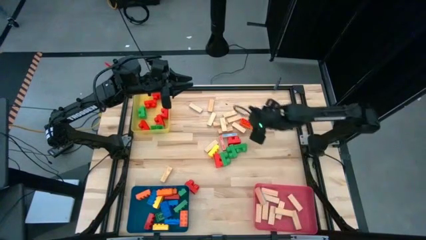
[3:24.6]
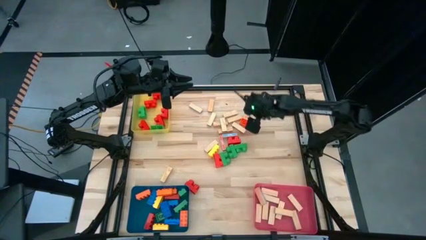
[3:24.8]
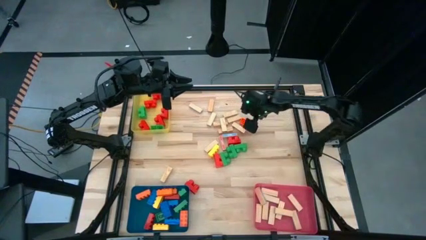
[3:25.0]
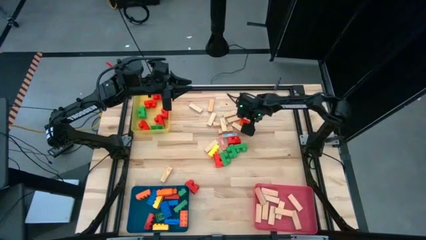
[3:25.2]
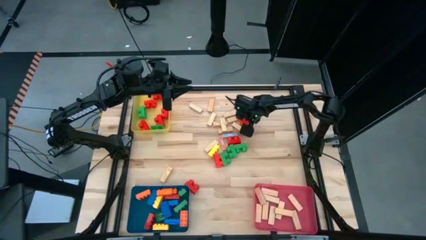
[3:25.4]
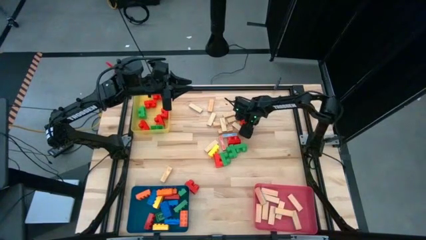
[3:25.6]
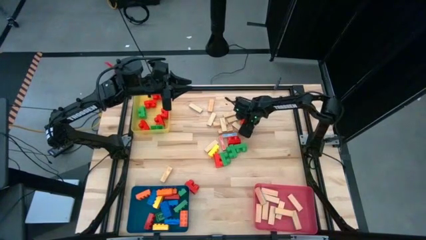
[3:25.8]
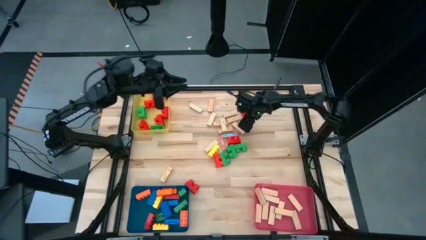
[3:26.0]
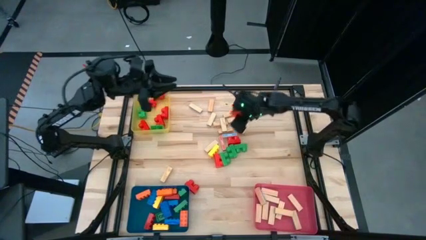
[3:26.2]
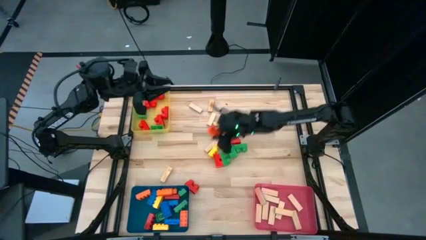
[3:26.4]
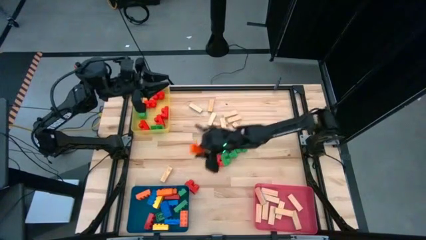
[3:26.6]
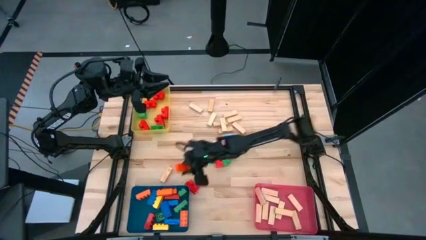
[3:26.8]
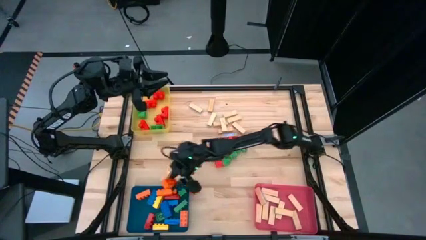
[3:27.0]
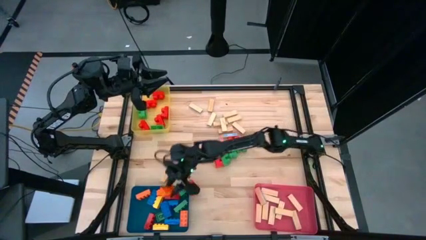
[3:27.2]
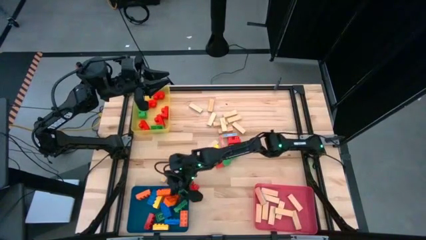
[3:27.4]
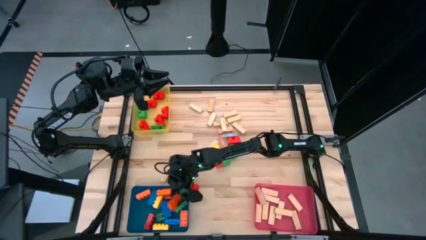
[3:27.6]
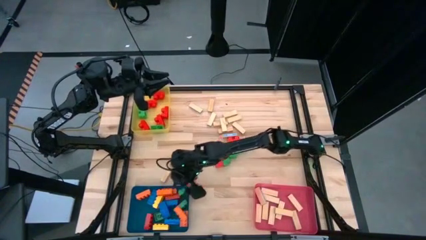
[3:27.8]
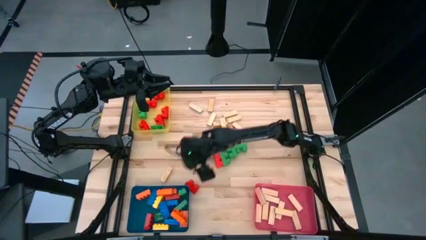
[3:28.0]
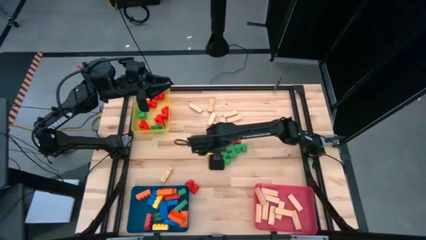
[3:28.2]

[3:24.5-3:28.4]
Task: Sort blocks by size
Put the orange rectangular game piece into the blue bin

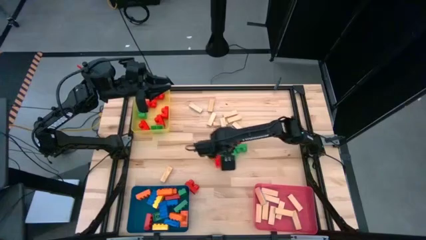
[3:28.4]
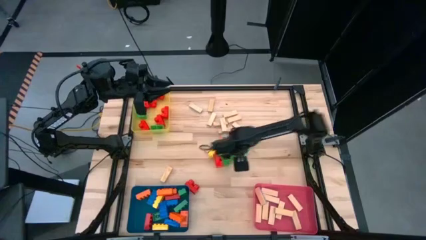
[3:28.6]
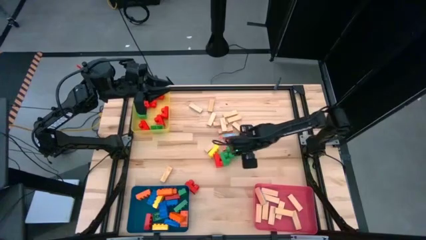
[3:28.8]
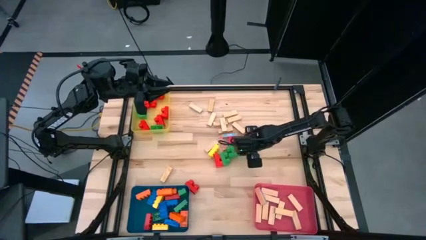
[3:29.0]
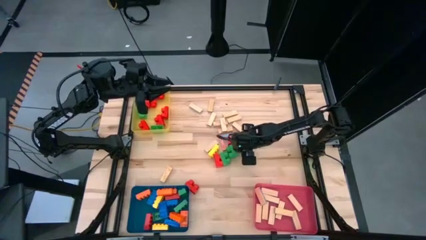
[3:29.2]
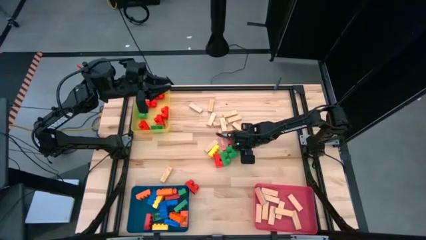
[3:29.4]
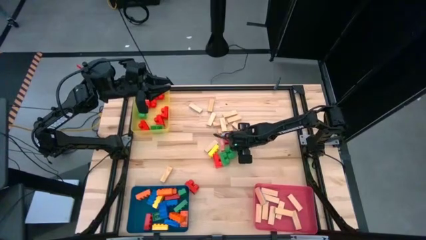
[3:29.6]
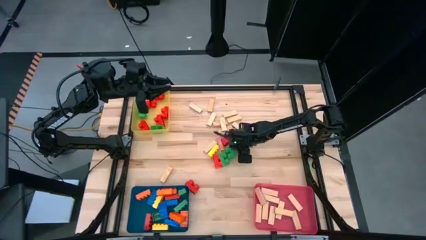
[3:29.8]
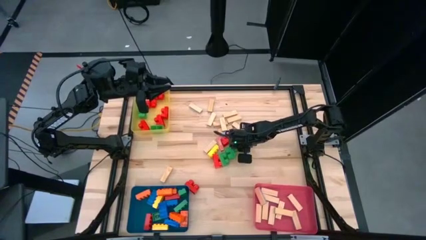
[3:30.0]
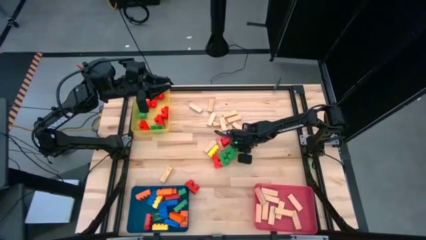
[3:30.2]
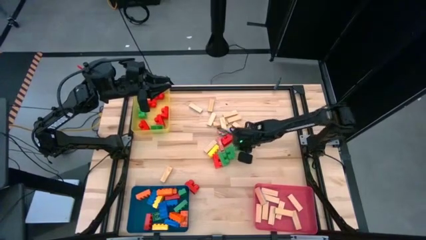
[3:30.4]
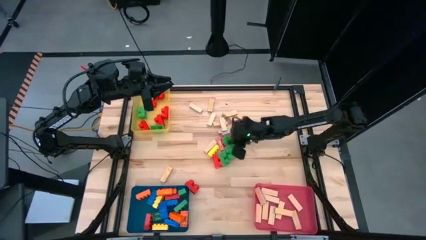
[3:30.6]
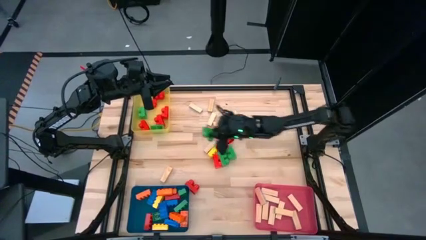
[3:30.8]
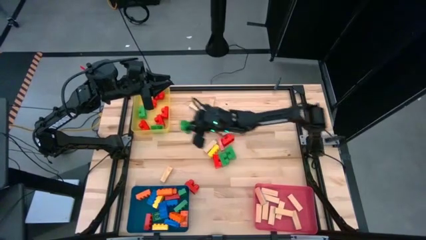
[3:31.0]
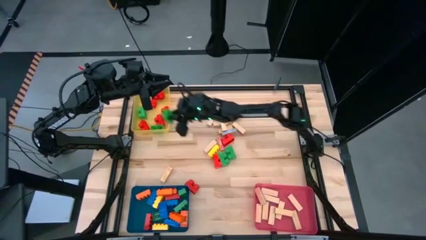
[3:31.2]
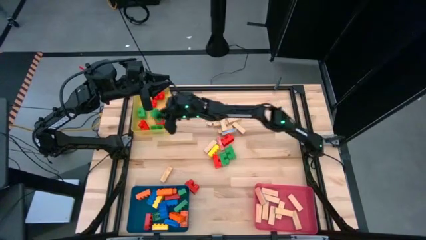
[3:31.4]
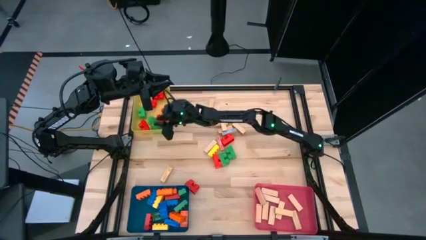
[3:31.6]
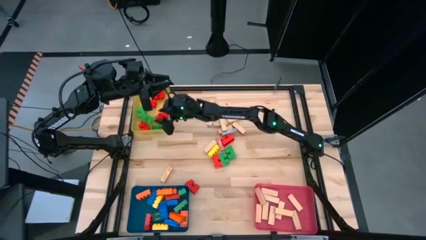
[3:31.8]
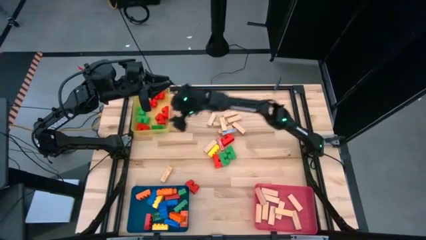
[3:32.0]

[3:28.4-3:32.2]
Put the round green game piece into the yellow bin

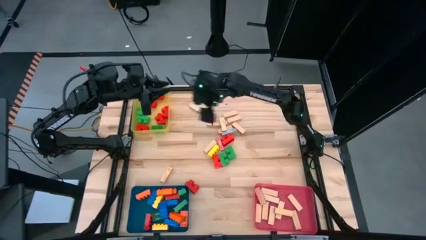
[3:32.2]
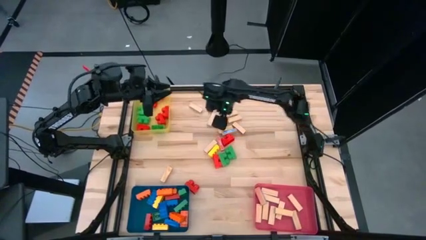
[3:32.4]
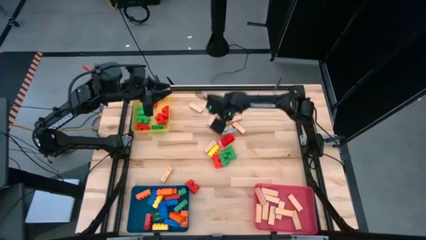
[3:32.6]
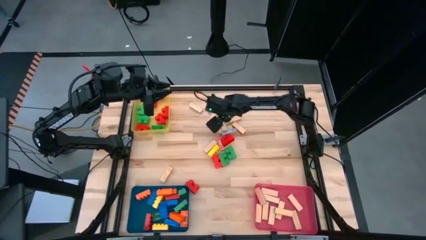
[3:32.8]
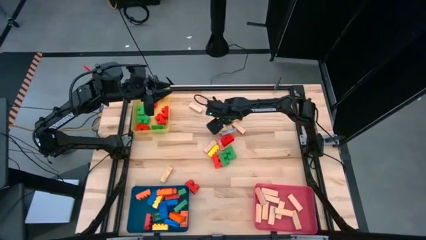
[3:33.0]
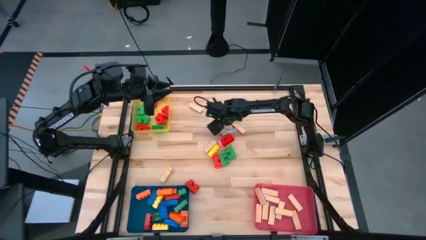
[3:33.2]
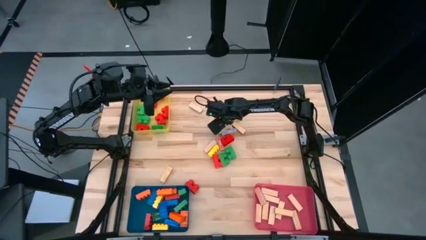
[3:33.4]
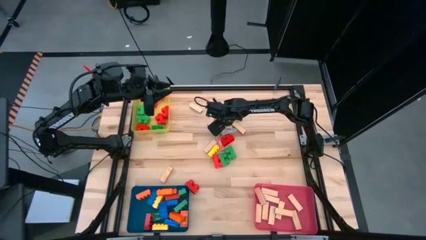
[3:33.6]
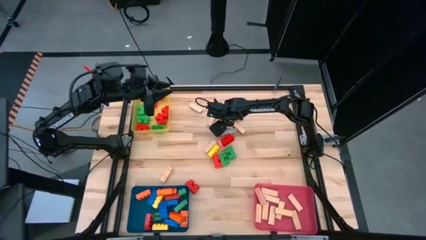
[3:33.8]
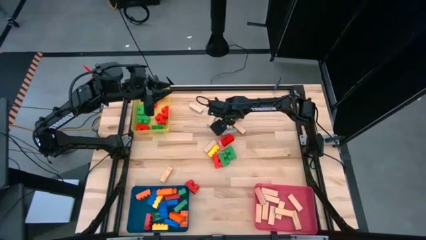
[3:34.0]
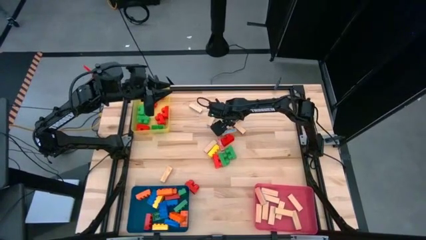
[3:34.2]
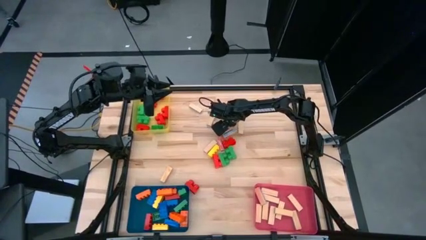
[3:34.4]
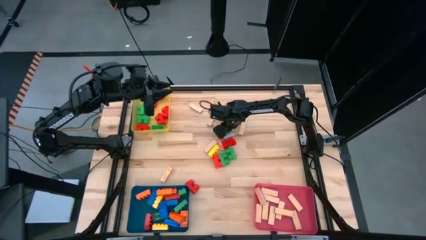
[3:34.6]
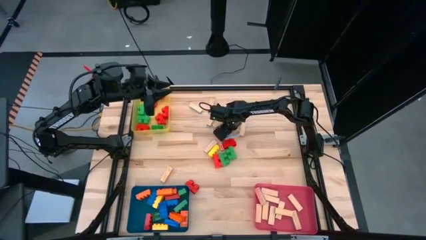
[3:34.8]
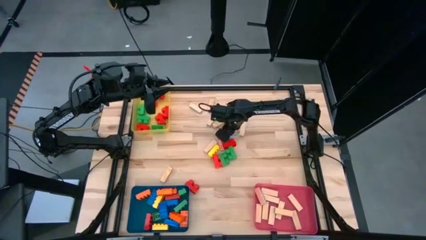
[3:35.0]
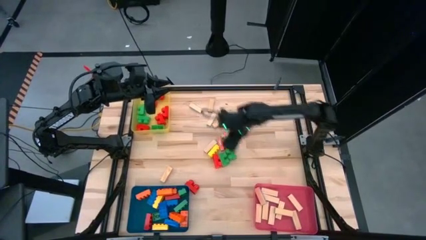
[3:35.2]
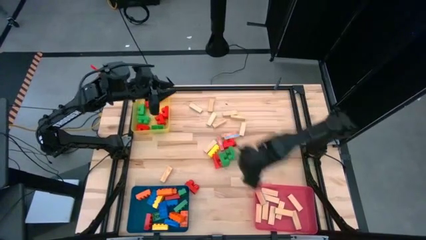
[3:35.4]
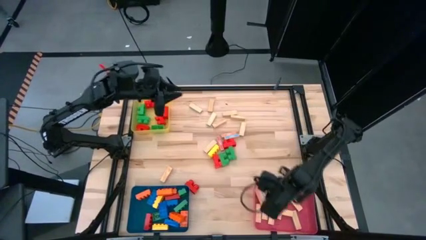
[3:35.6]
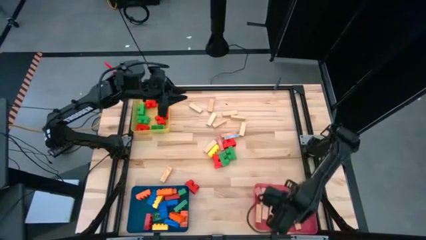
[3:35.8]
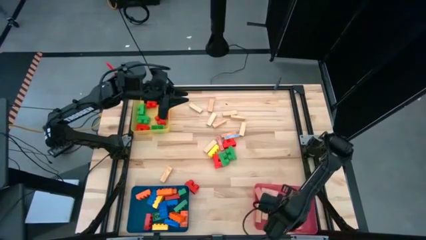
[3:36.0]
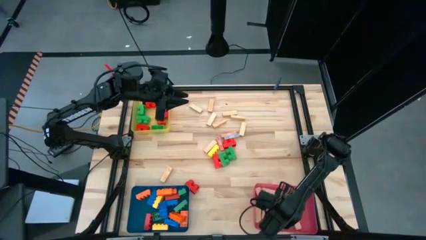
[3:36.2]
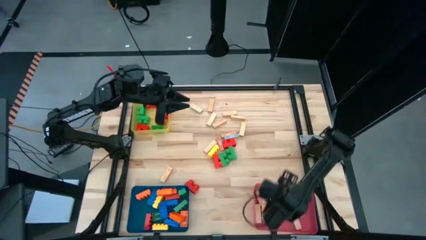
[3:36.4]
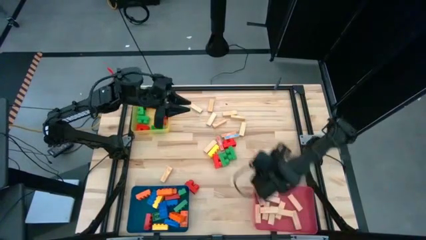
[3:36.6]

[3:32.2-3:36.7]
Put the wooden block into the red bin

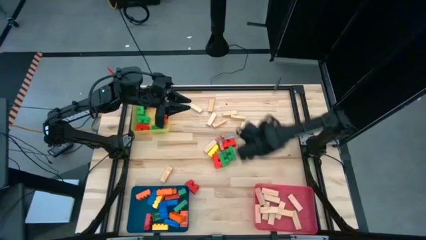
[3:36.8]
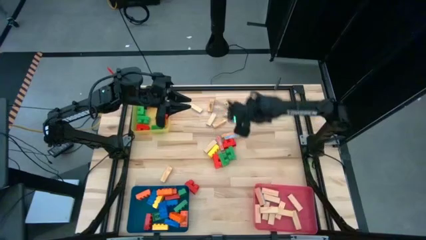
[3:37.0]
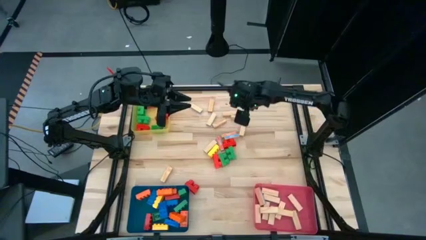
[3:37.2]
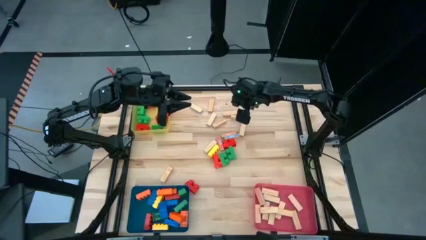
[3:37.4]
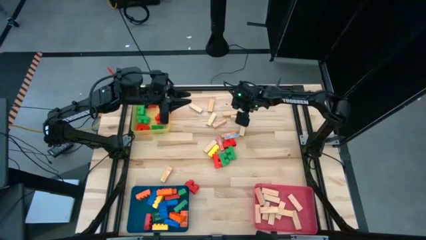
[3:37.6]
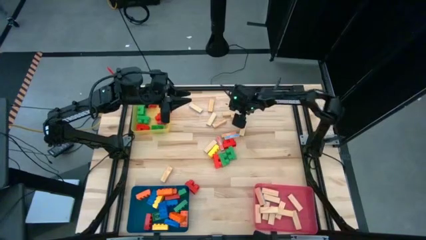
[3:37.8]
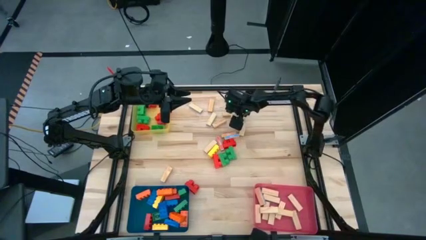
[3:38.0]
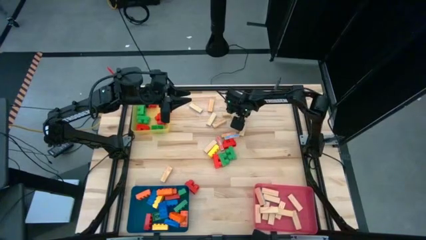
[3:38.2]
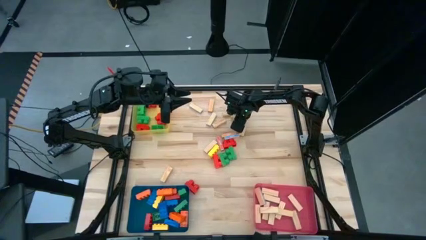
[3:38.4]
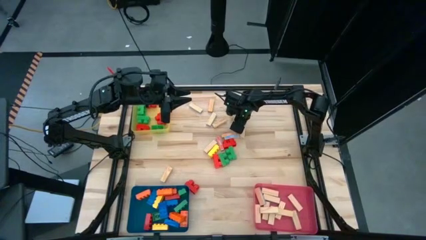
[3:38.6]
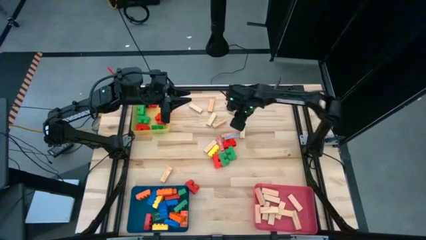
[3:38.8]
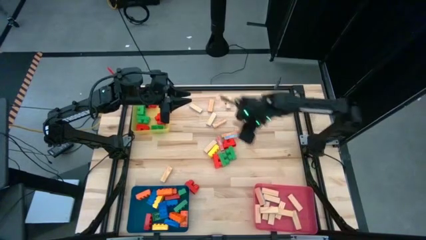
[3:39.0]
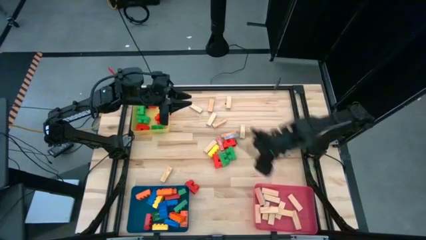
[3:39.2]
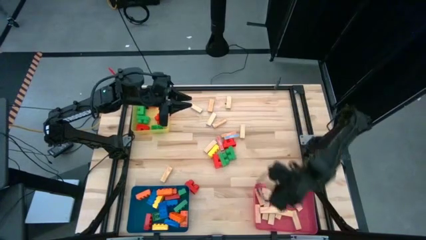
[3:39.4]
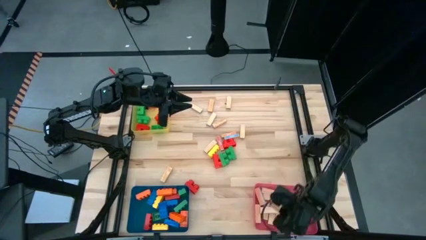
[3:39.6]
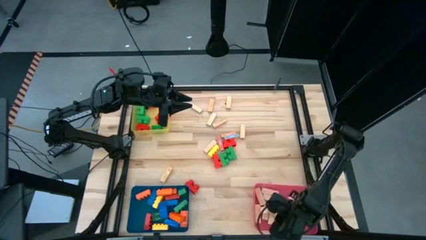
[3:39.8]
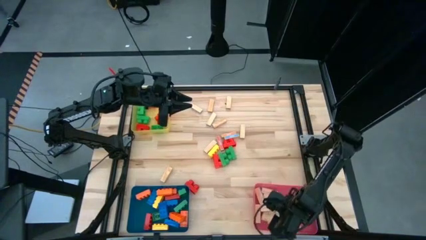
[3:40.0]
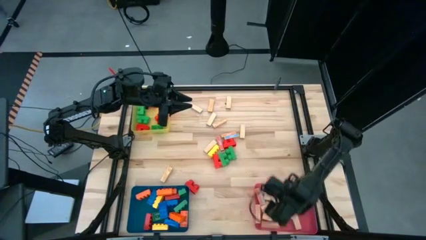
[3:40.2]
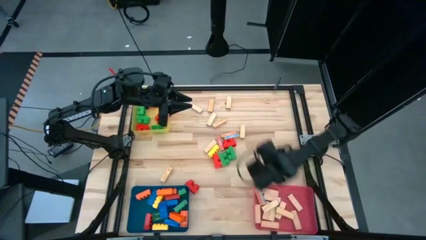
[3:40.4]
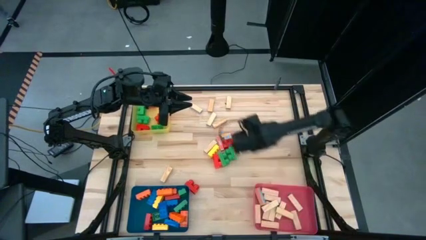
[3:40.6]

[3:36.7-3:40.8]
Put the wooden block into the red bin
